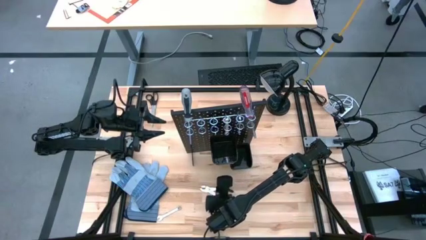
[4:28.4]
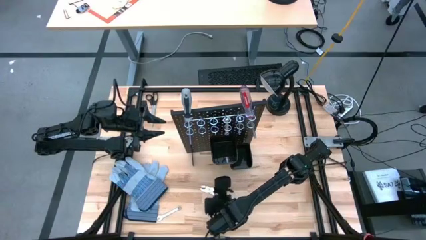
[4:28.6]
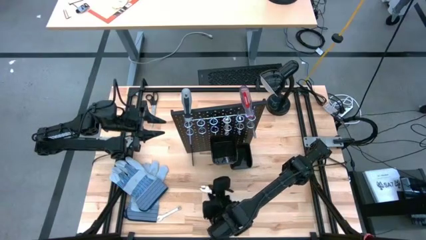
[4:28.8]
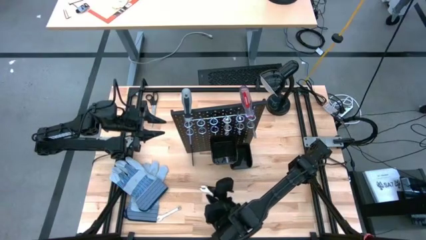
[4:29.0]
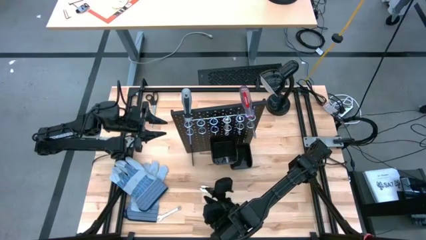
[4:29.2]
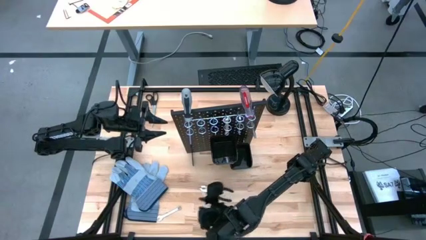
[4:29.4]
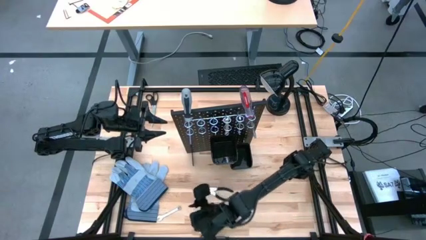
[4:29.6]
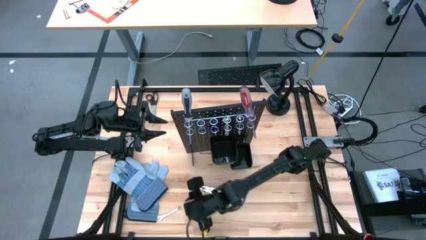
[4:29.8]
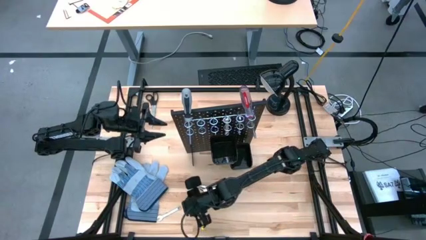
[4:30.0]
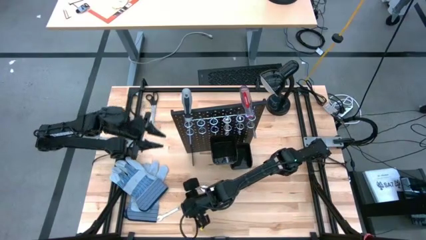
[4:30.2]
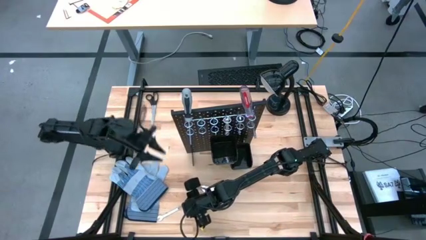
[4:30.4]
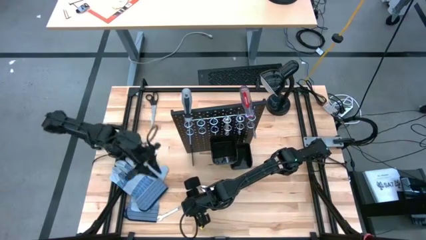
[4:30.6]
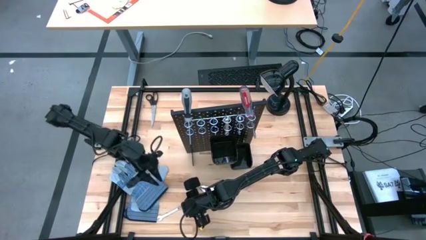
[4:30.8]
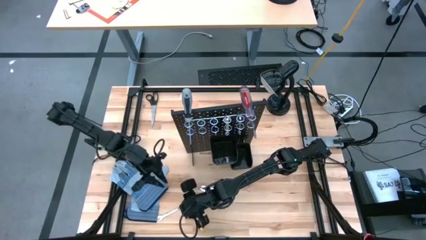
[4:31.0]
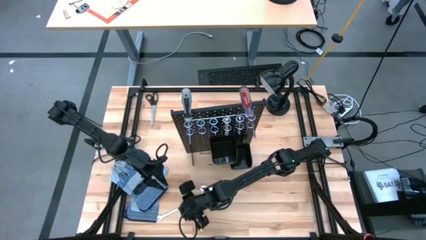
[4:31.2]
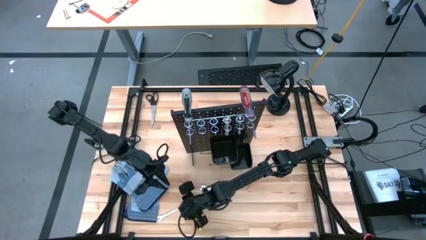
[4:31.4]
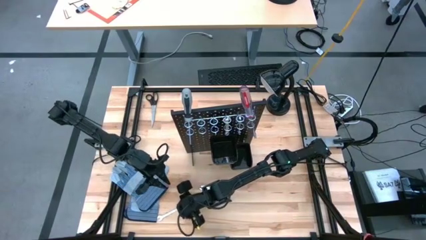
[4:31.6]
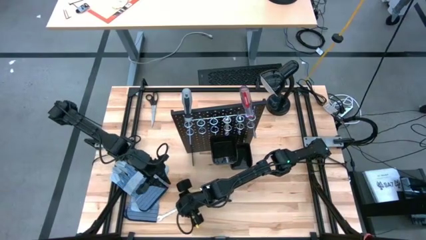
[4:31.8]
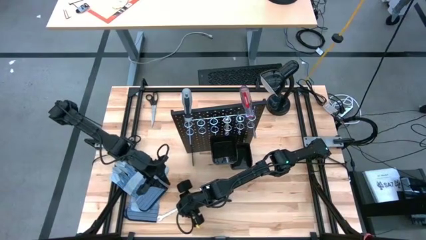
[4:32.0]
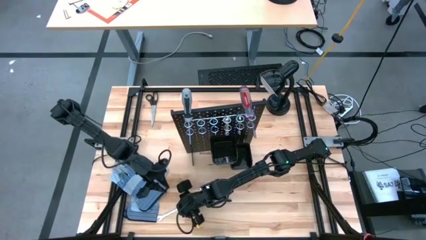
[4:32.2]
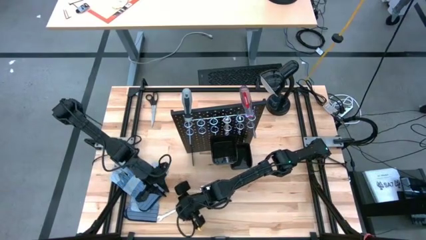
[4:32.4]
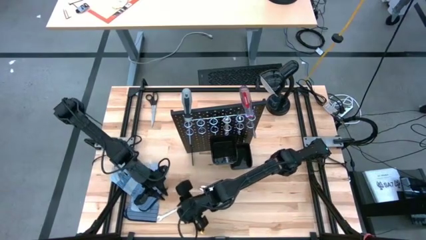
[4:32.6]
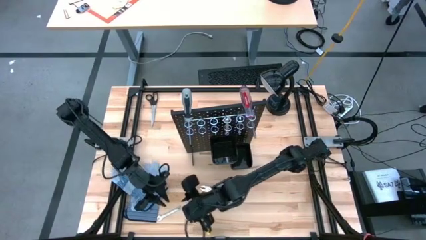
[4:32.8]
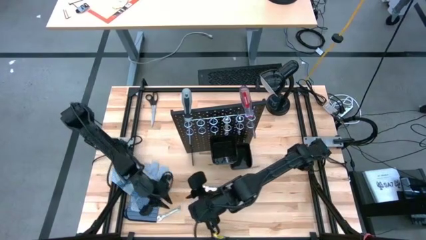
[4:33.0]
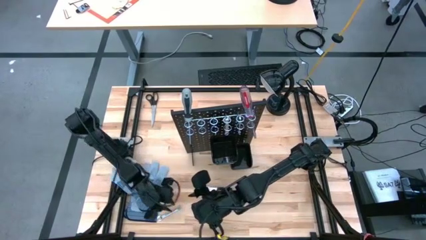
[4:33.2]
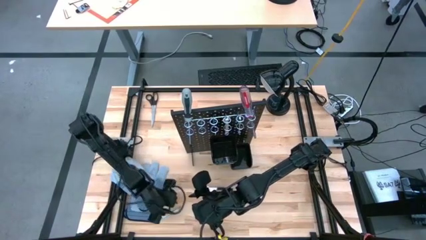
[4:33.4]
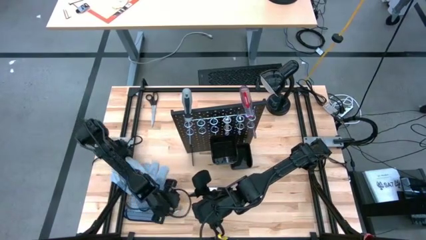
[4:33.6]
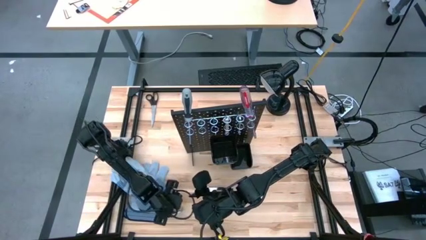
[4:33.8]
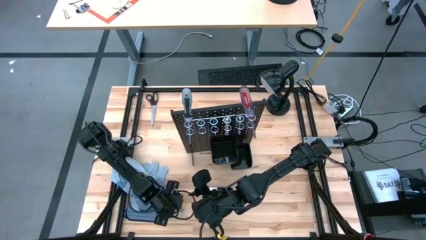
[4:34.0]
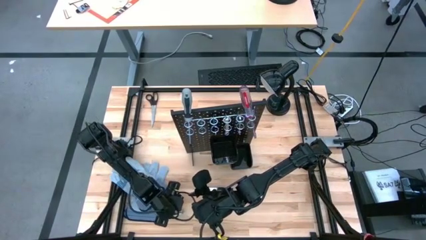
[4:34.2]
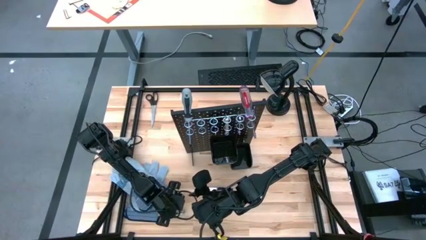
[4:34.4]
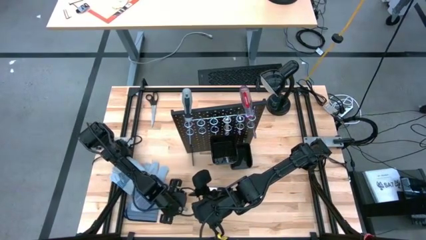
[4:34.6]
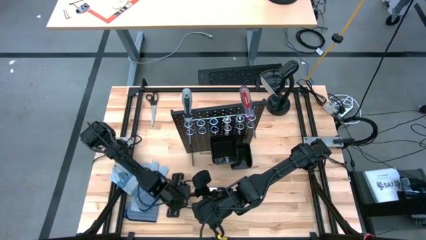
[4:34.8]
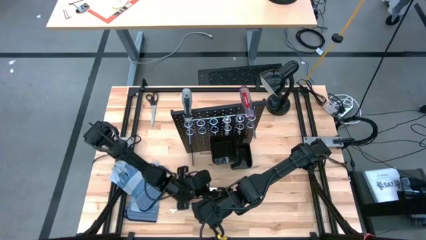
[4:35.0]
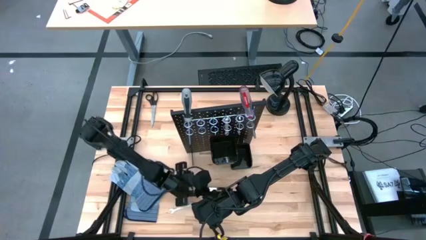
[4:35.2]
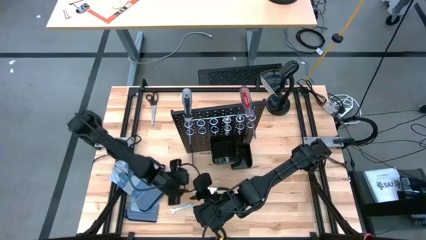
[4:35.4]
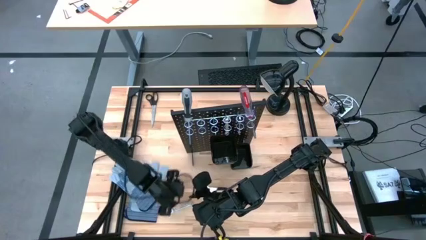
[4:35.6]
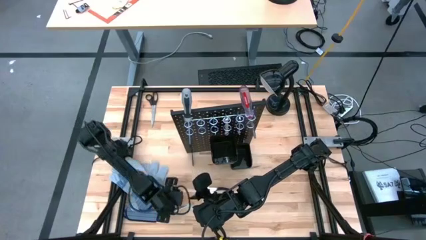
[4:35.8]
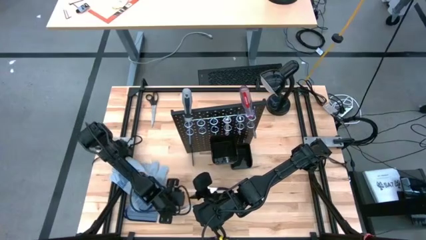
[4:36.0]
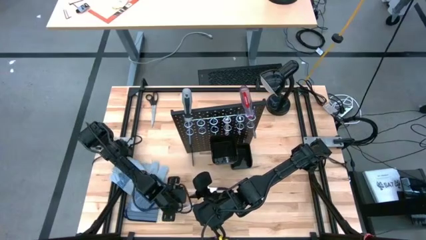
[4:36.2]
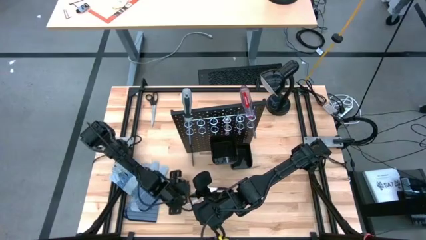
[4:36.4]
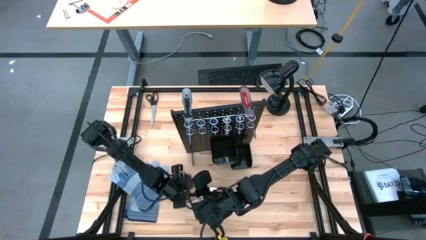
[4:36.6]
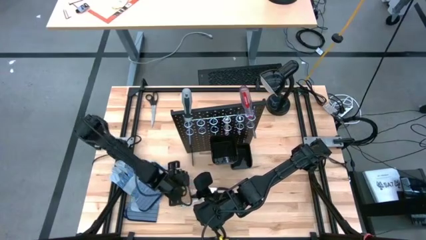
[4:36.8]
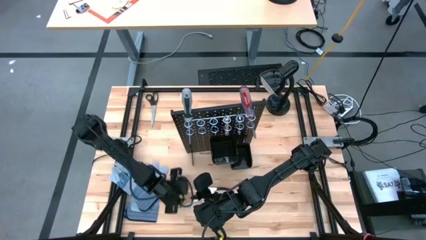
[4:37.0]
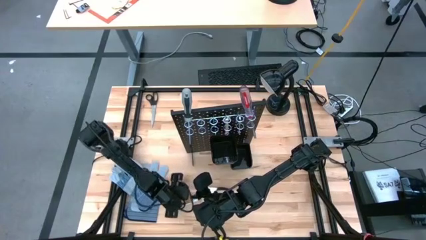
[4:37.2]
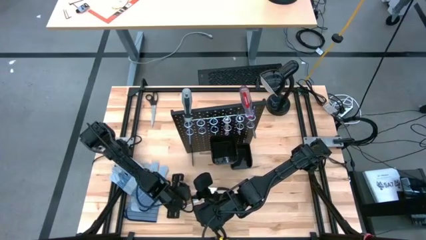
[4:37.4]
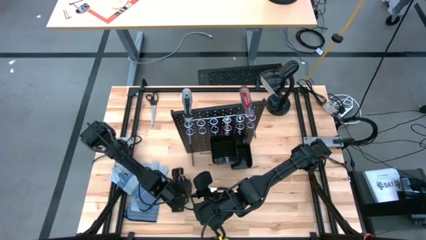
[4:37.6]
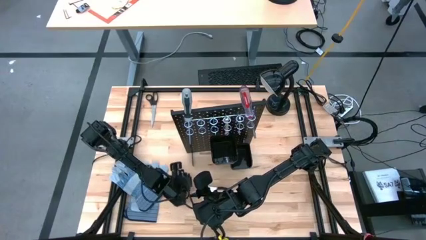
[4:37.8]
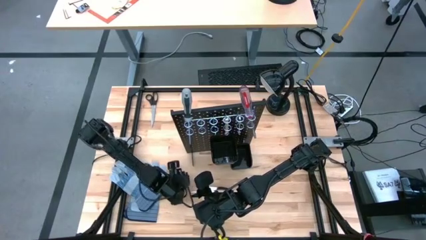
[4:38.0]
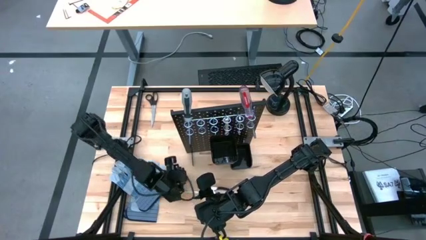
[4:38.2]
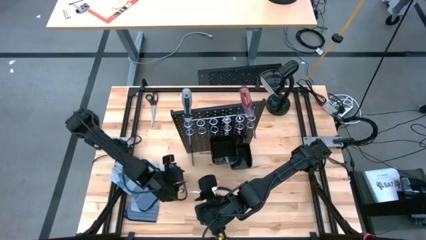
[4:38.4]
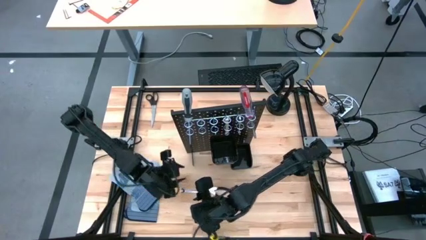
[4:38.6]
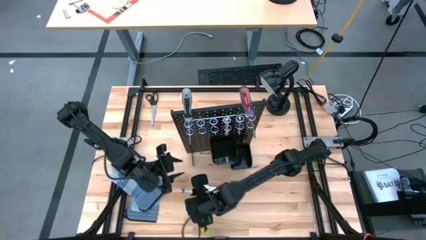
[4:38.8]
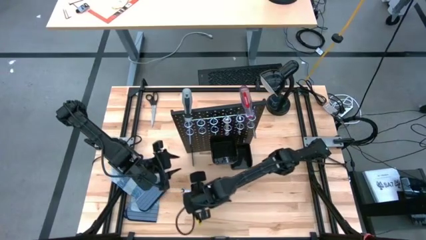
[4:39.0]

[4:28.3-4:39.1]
Task: Hang tools onto peg board
Hang the silver wrench on the black peg board
